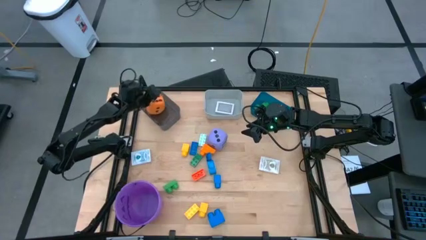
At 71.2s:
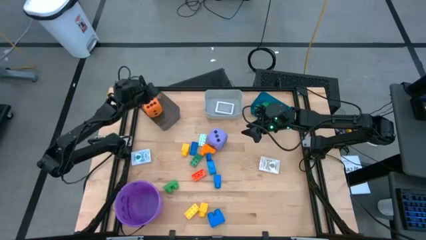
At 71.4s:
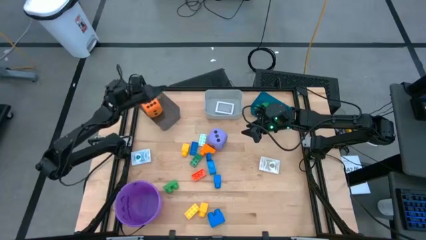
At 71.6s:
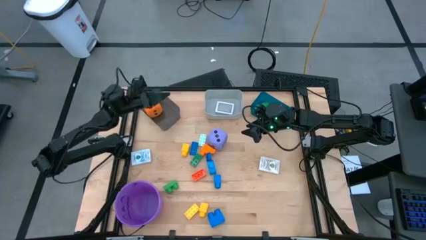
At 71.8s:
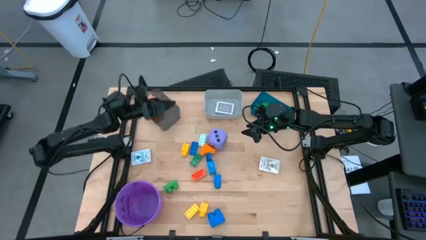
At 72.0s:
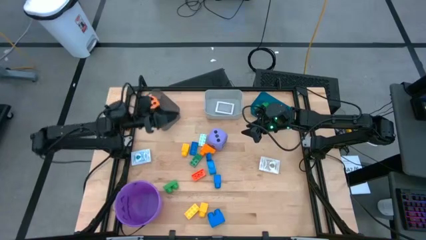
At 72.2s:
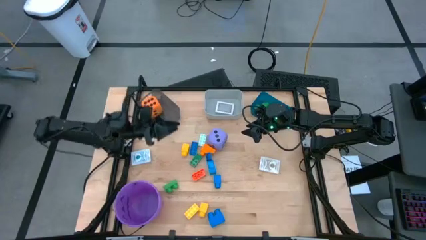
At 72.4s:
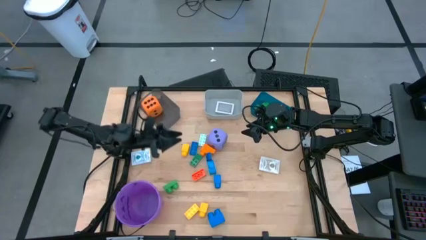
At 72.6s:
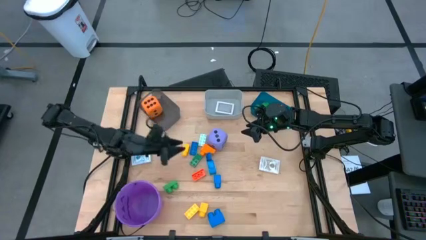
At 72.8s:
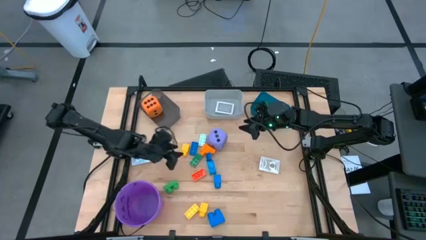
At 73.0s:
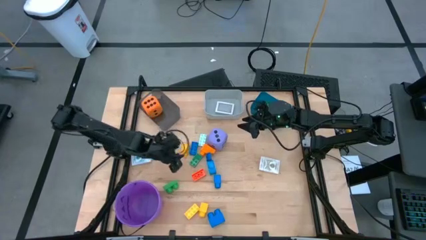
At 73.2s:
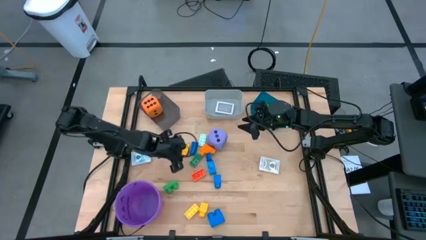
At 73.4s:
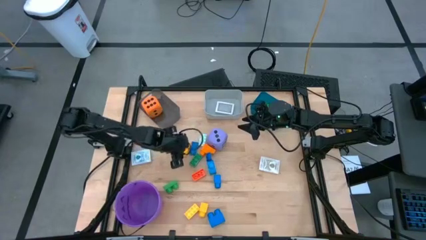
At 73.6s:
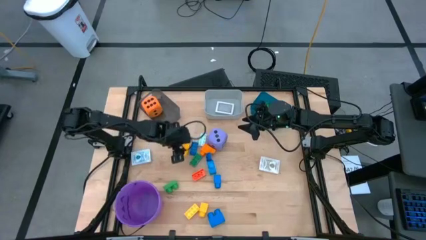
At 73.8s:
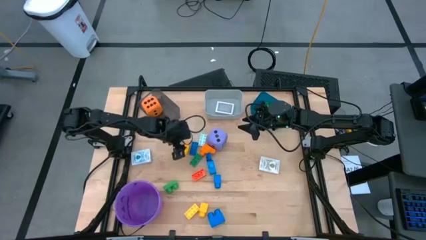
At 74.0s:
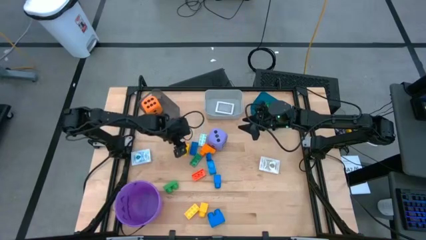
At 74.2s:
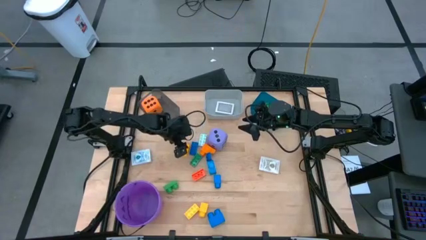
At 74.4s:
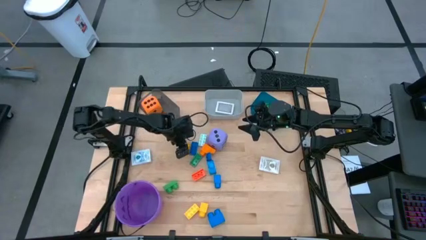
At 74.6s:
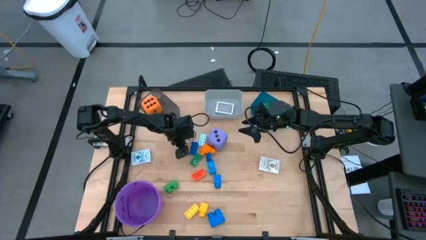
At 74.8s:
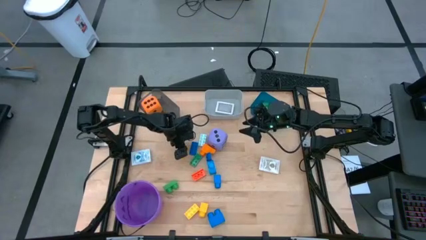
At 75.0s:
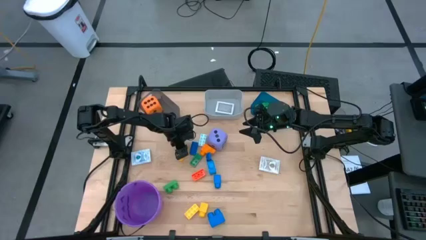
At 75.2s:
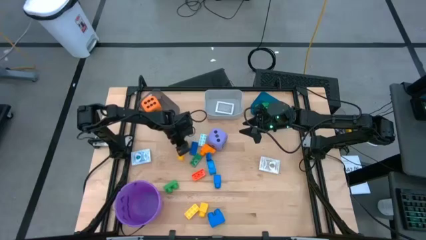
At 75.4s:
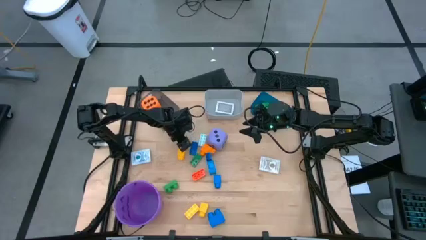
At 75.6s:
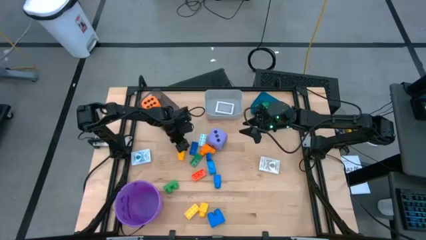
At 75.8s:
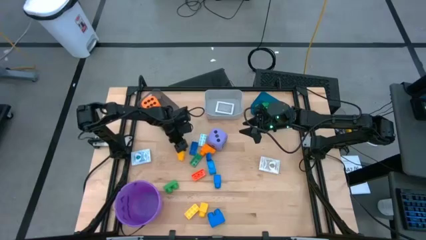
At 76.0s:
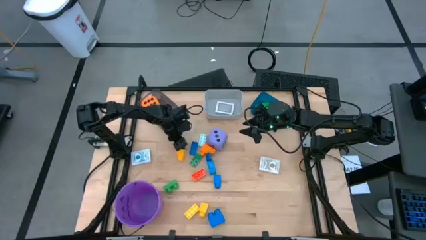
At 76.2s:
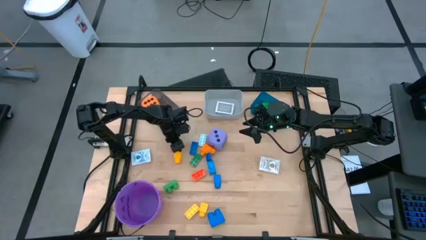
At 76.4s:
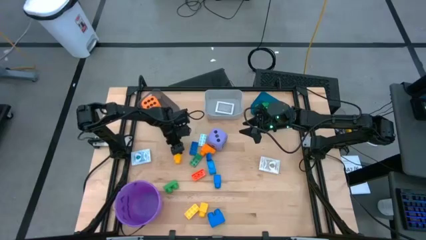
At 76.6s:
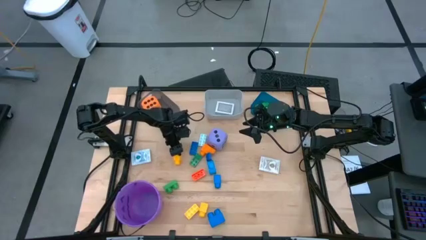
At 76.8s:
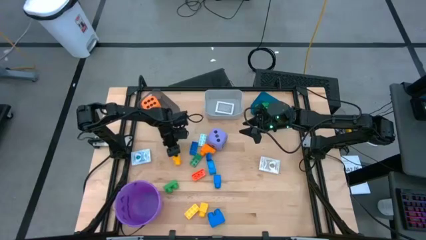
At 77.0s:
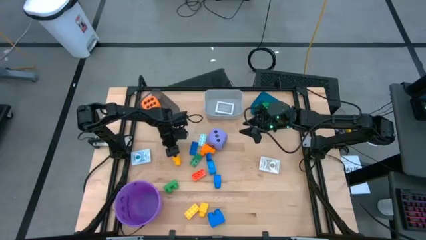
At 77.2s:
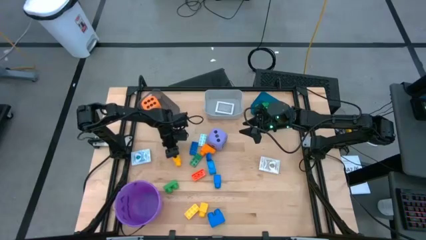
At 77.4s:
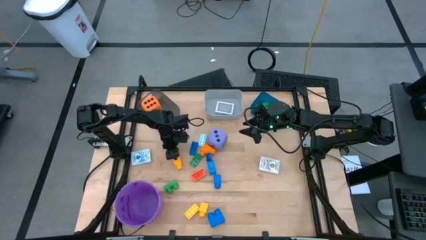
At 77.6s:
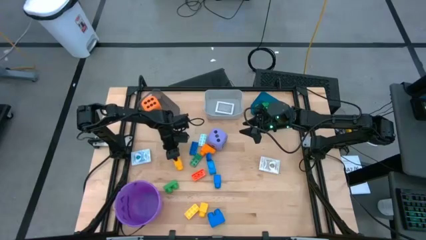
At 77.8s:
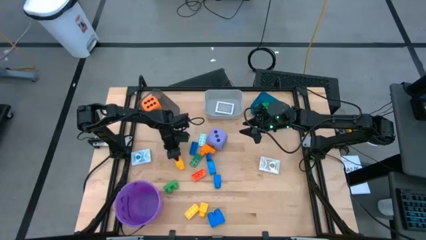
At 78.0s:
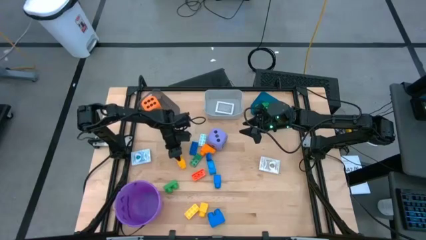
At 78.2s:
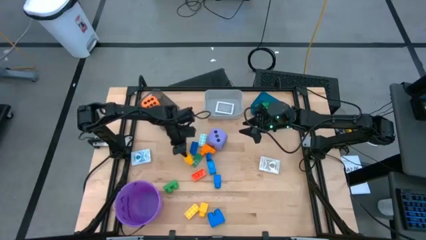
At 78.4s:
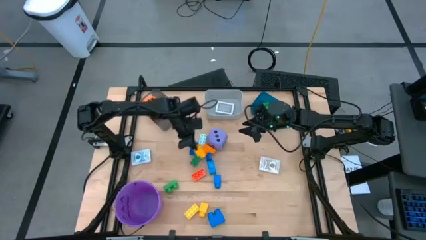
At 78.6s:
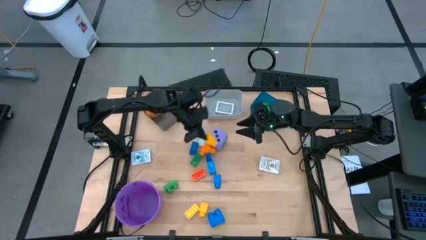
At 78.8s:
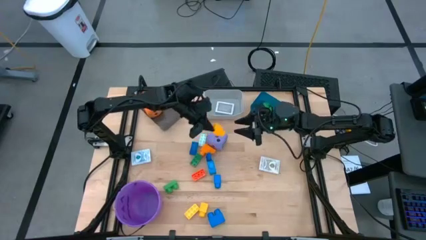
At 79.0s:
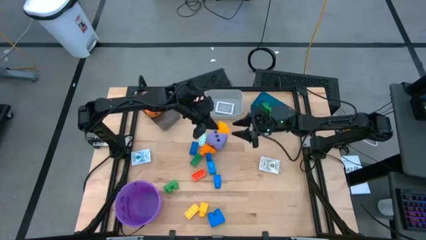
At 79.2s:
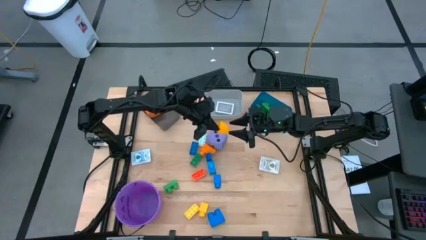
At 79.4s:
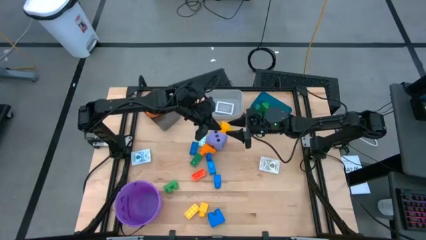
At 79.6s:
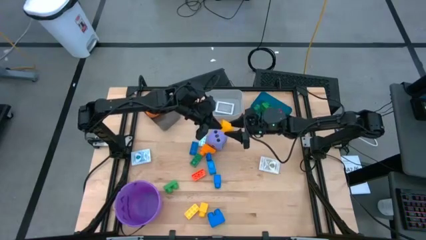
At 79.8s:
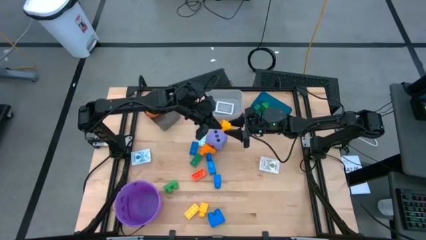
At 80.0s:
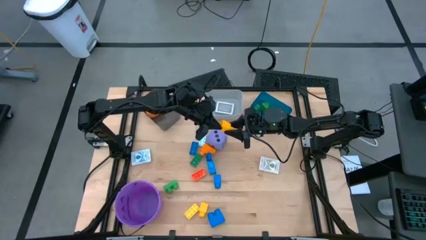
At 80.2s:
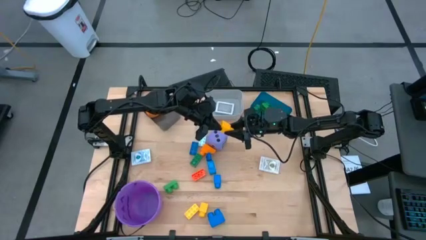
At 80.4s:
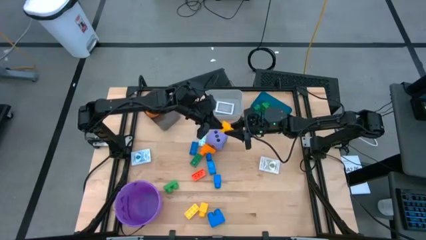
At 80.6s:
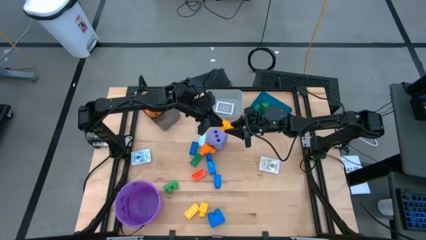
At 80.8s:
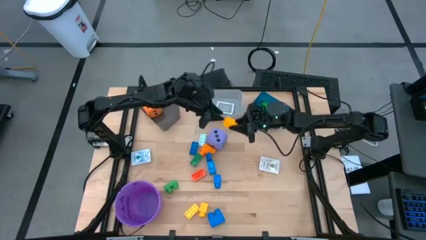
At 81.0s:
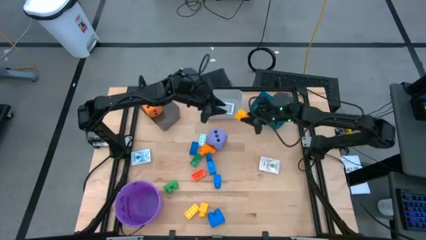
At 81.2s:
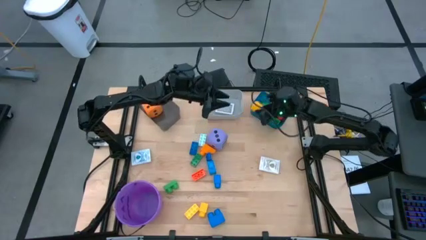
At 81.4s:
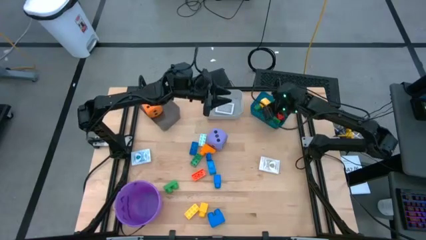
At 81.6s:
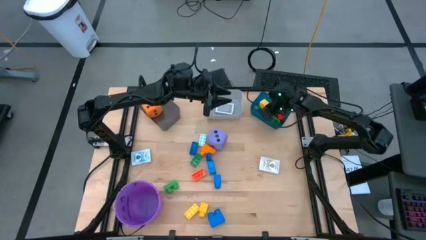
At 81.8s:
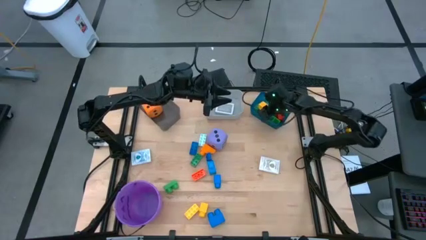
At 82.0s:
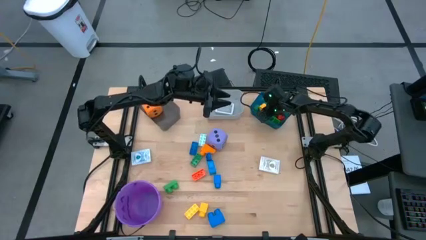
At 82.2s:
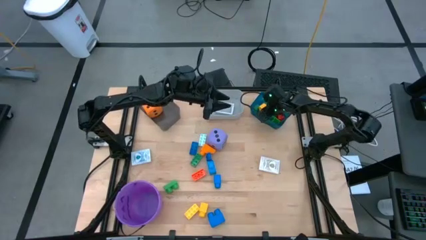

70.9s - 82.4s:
Task: Pick & Place Toys
Put the yellow game piece into the blue bin

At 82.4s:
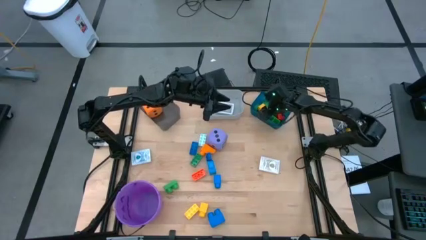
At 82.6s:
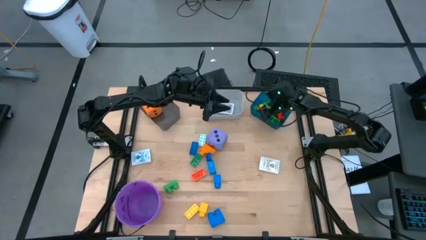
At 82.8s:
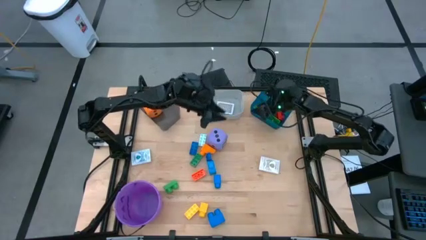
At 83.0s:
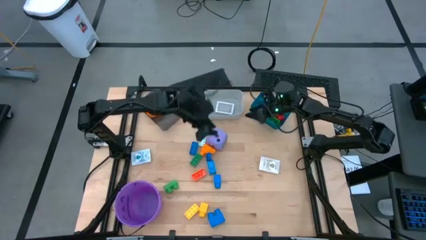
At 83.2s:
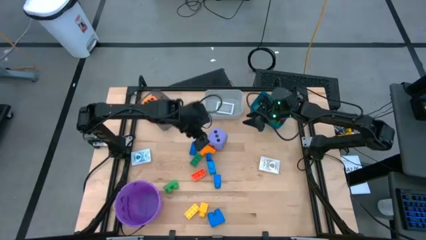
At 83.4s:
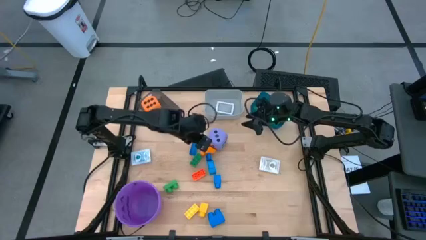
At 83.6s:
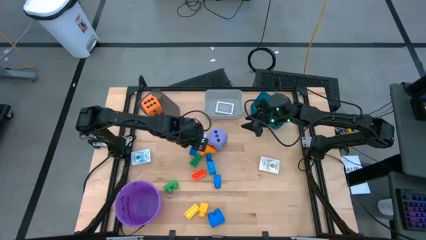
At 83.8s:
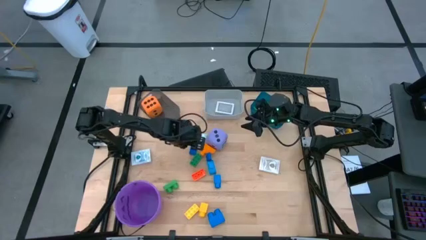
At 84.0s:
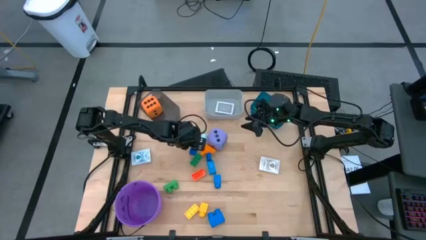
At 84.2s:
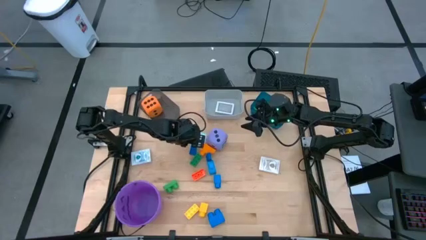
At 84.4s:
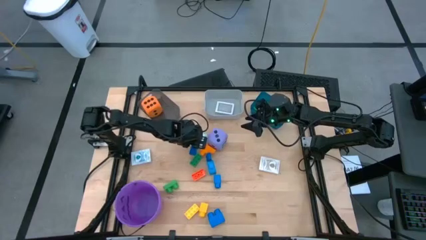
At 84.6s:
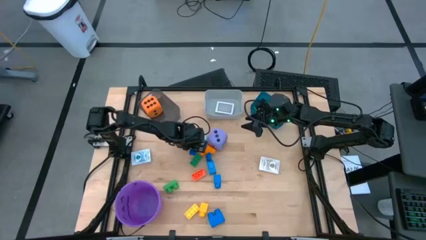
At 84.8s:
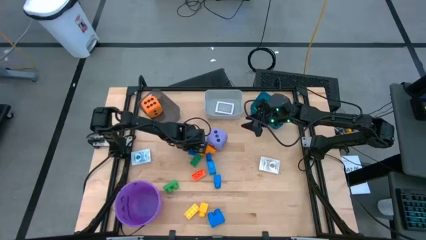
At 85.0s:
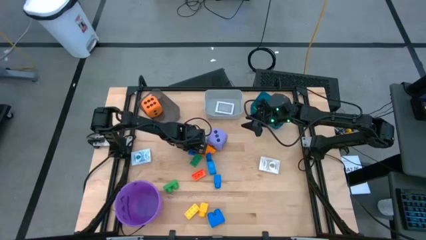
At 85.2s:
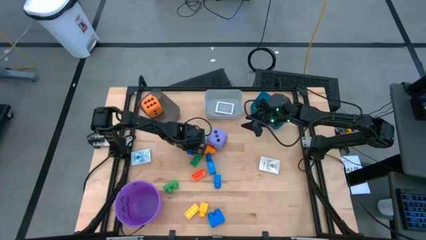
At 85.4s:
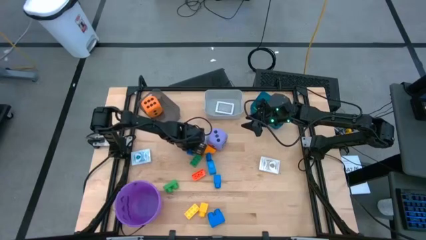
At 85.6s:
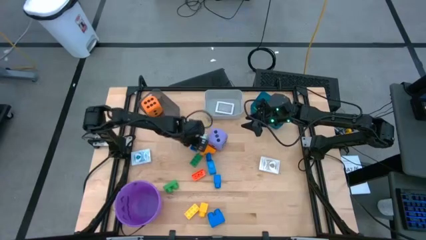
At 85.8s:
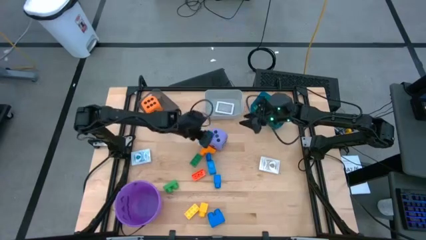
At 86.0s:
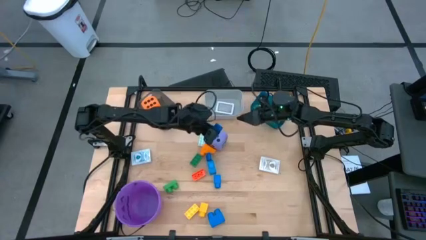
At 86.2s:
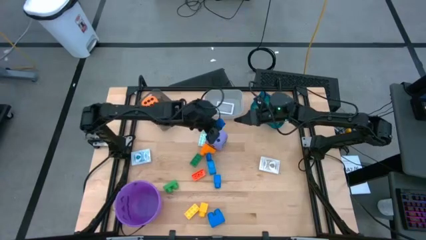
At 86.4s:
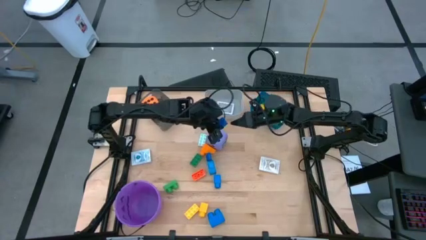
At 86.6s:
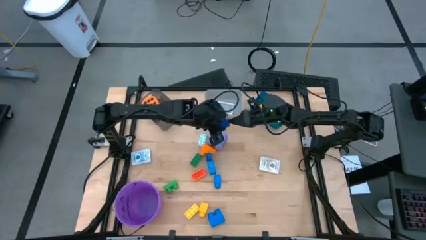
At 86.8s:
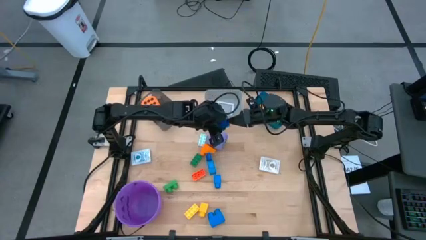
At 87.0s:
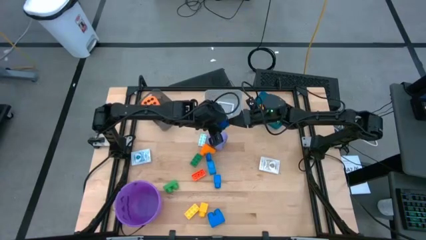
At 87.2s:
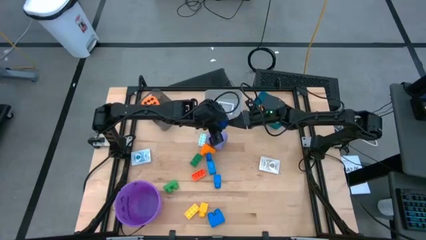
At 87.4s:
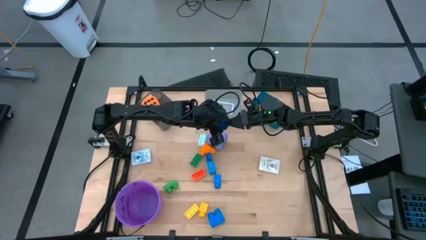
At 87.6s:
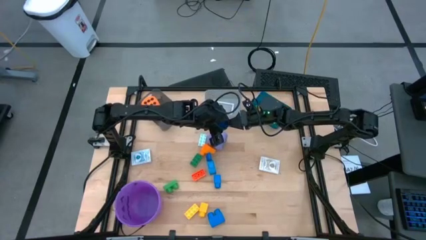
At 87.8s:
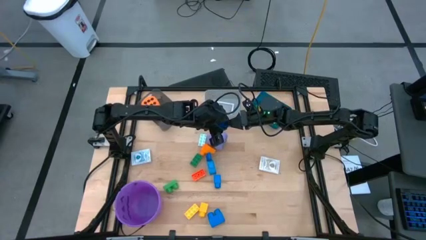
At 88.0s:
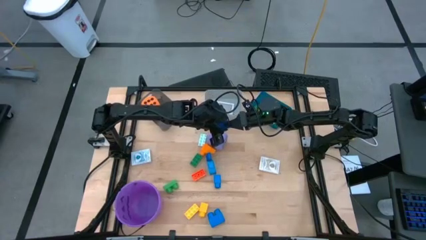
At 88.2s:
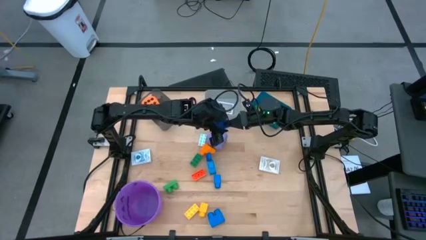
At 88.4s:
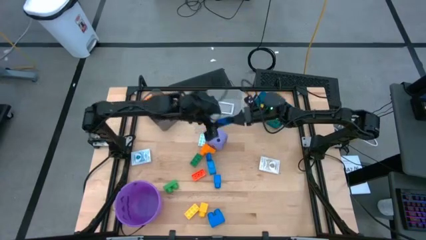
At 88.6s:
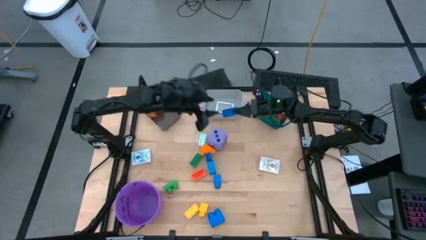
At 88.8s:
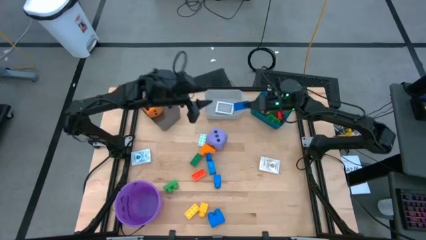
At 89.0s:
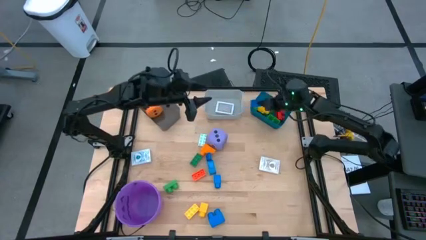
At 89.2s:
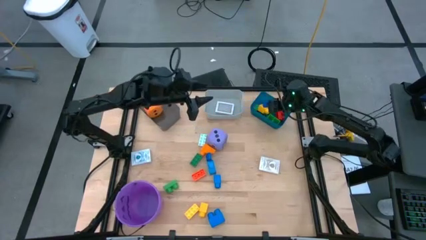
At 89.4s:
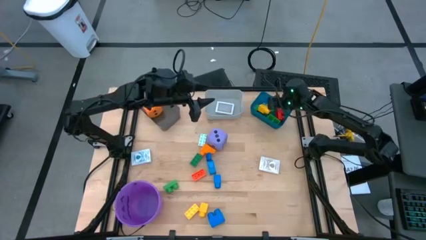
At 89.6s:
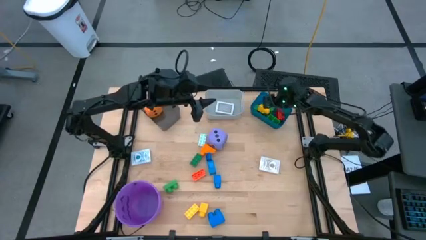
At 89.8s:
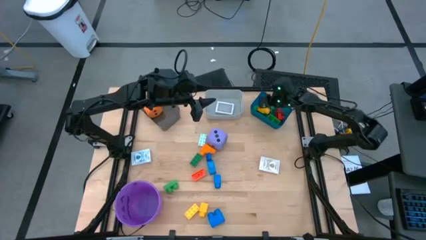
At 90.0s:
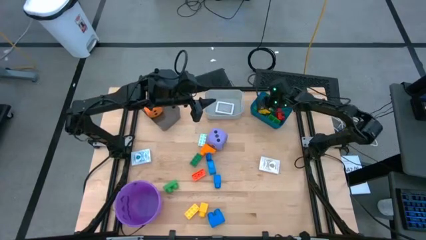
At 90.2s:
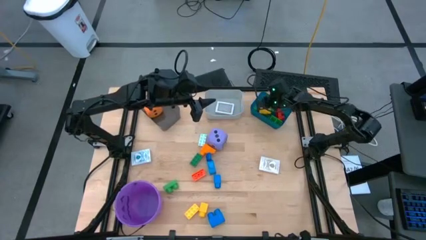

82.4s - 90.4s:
Put the blue game piece into the blue bin
